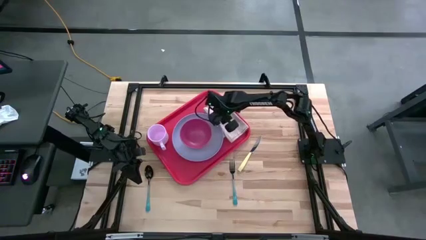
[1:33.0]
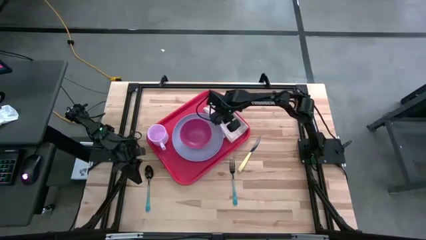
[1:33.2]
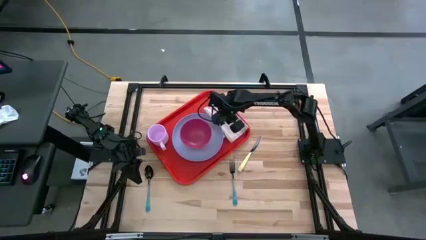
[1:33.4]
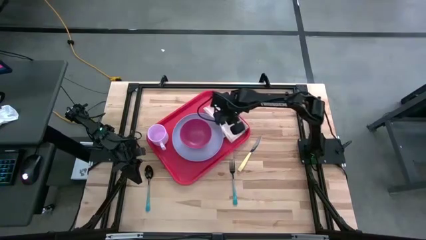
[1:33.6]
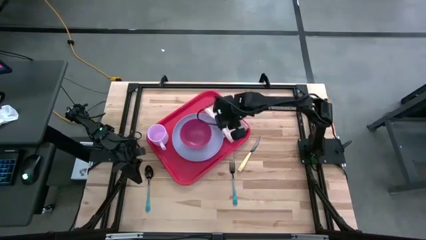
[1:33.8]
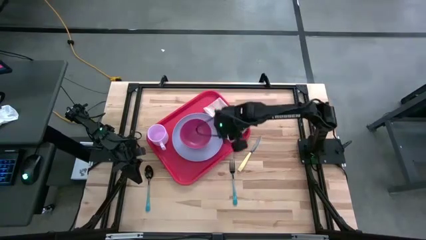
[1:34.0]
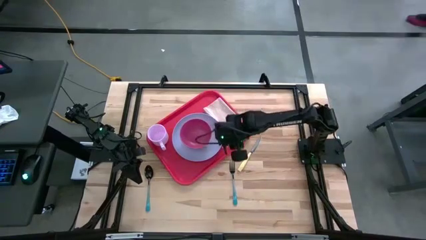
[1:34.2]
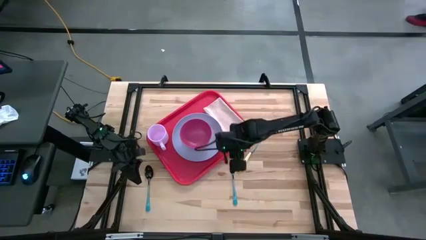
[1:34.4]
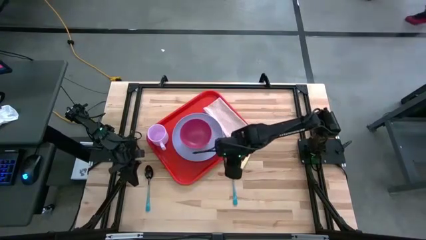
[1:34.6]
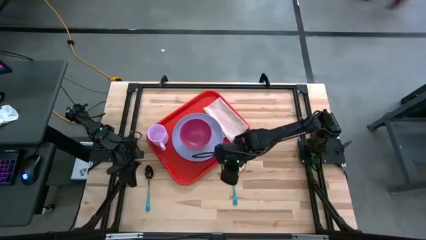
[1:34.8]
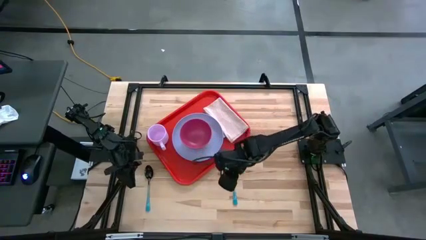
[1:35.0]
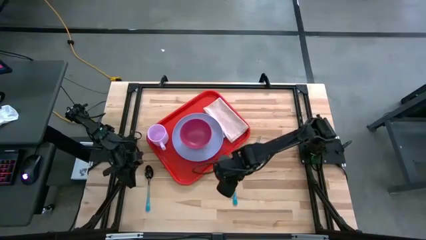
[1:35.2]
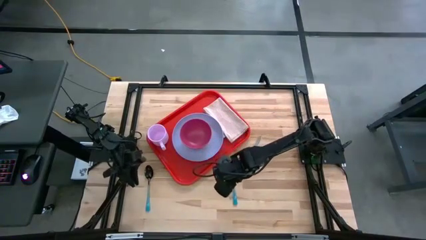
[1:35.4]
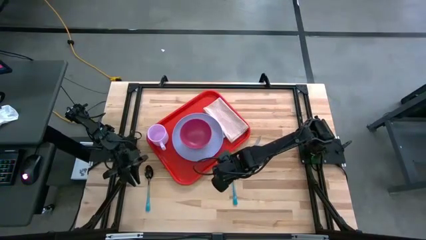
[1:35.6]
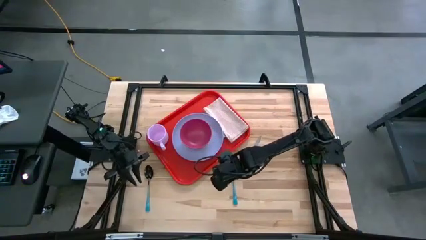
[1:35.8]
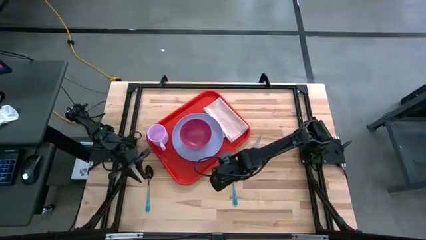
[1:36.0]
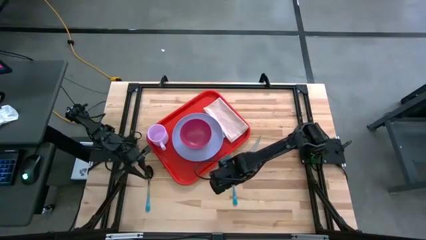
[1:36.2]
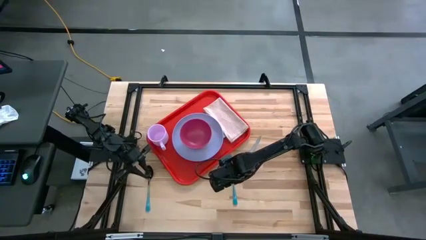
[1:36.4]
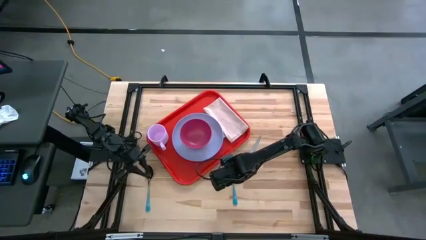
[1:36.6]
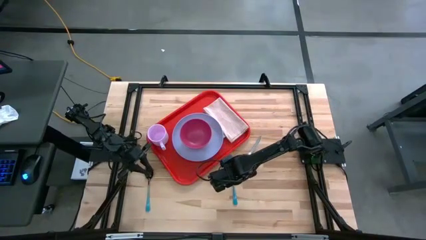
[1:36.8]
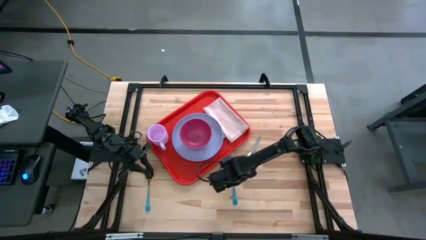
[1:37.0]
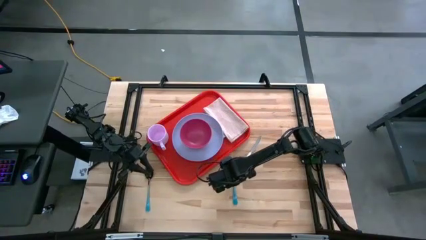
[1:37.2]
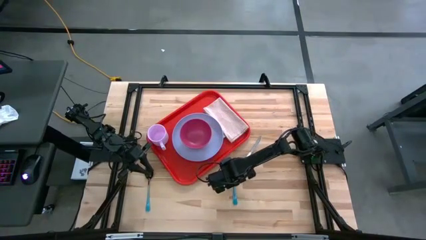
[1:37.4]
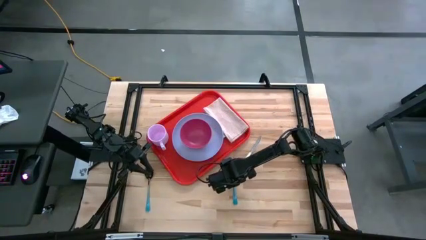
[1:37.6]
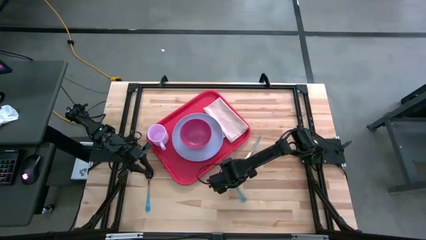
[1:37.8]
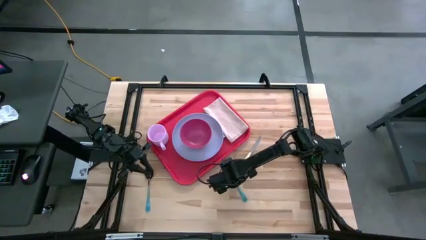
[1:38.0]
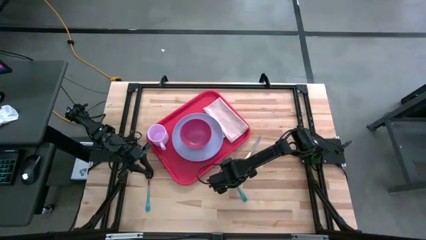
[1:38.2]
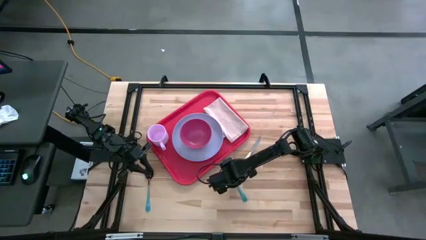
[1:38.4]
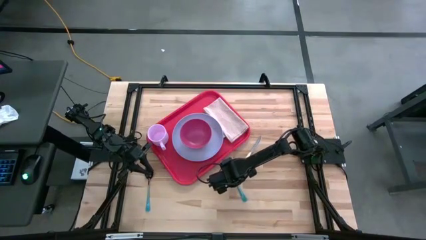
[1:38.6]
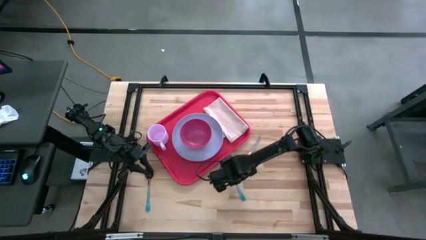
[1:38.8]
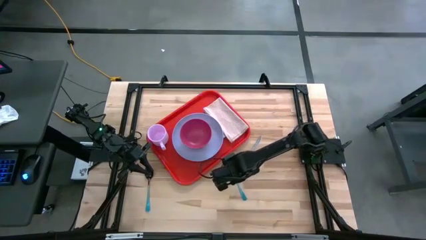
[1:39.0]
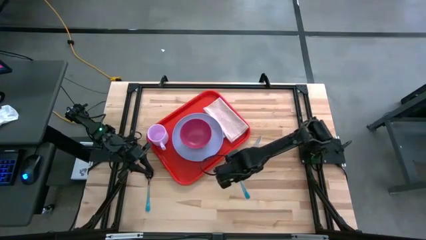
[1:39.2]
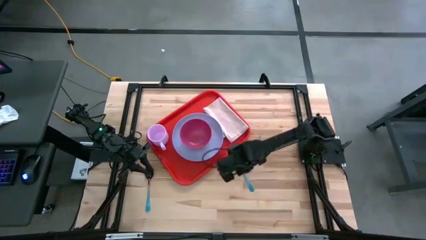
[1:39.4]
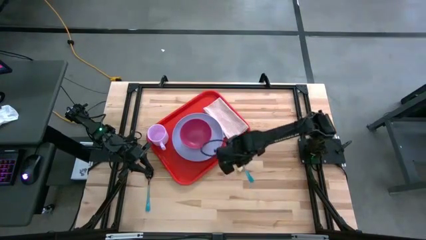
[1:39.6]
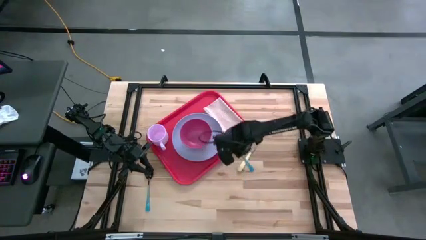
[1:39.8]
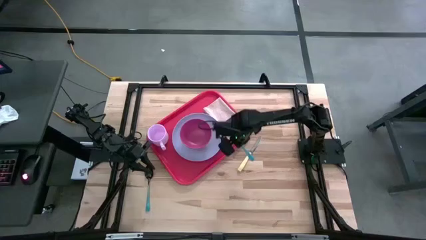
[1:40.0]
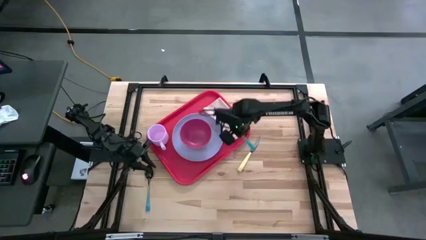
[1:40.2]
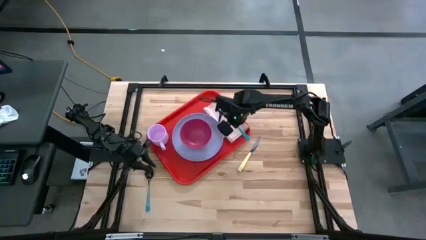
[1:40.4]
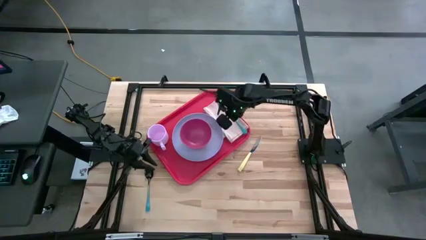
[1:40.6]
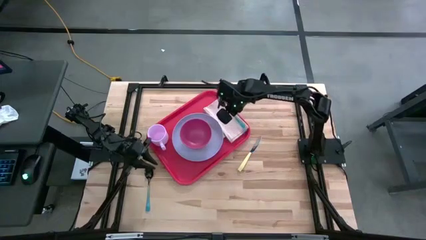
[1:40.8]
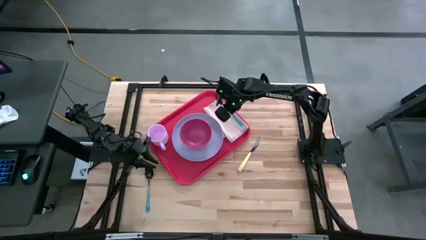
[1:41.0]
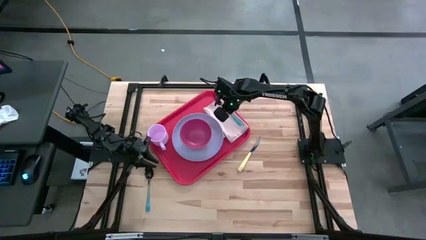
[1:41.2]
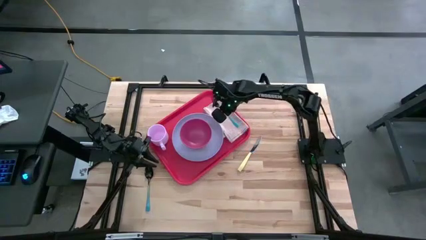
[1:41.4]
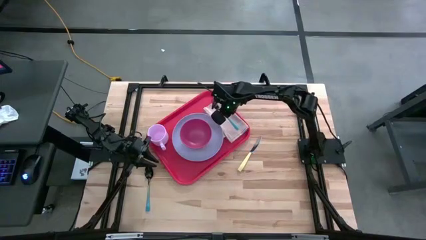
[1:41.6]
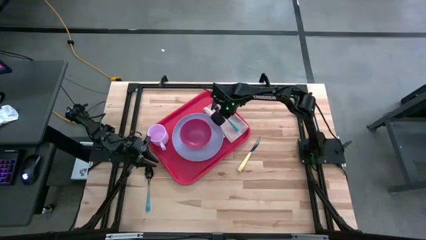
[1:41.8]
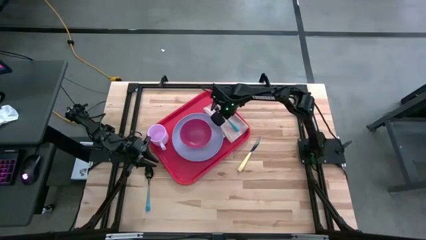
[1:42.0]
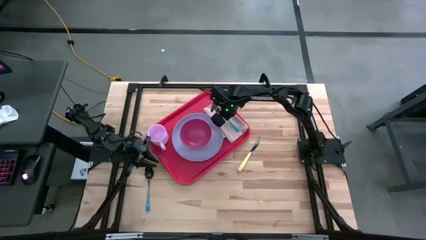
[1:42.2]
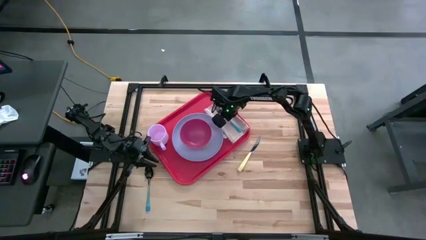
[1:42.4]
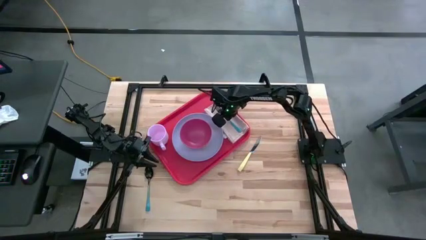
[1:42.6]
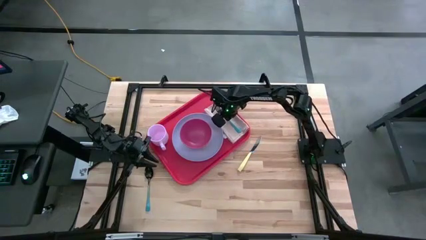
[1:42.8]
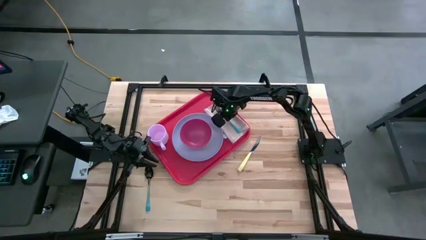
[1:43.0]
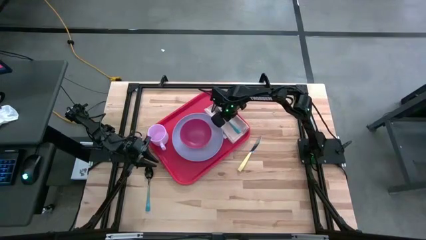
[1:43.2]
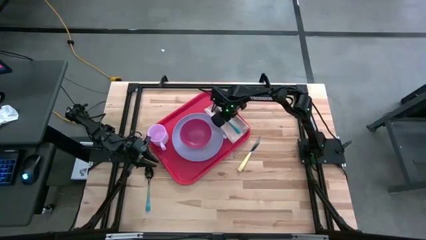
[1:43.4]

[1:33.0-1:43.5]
Task: Set up tray
Put the blue fork on top of the table napkin on the red serving tray

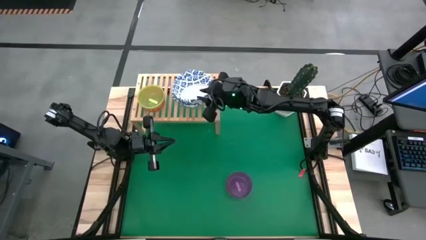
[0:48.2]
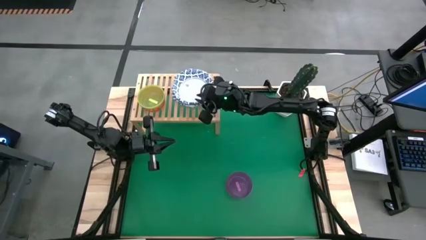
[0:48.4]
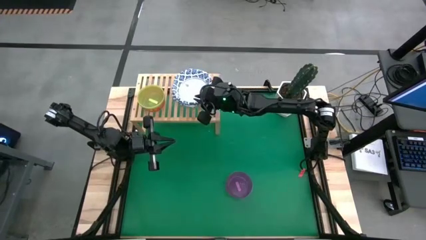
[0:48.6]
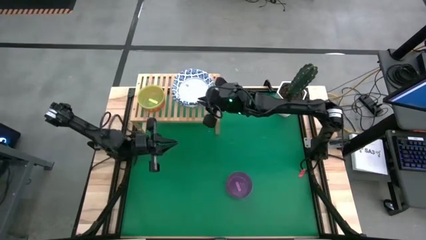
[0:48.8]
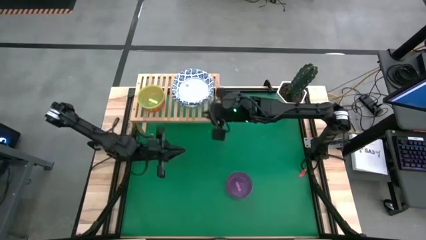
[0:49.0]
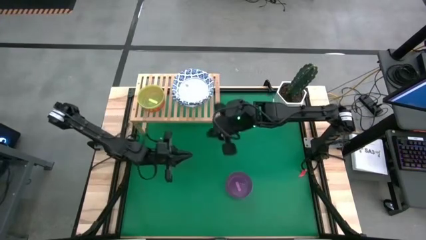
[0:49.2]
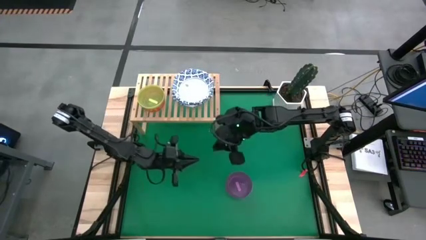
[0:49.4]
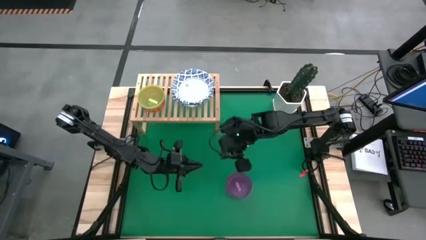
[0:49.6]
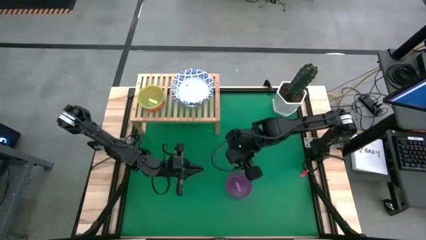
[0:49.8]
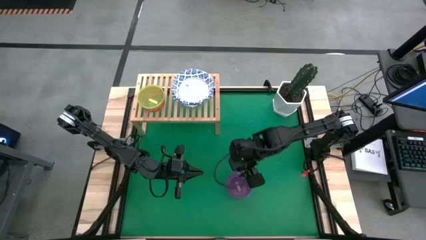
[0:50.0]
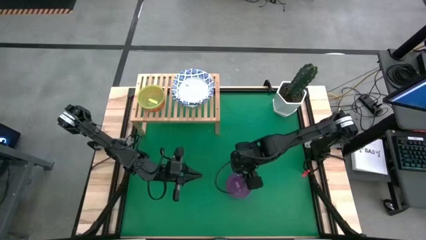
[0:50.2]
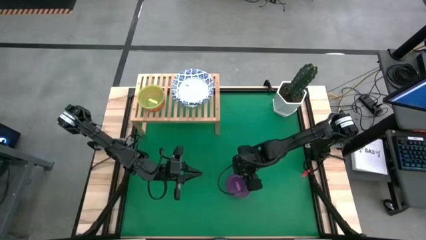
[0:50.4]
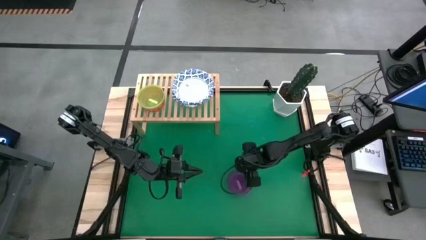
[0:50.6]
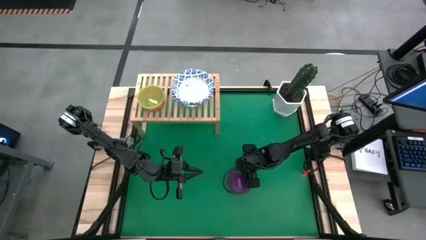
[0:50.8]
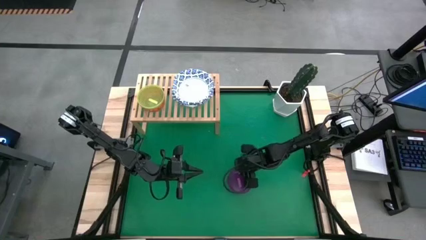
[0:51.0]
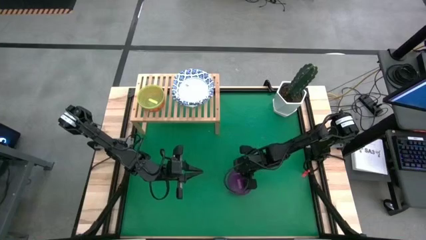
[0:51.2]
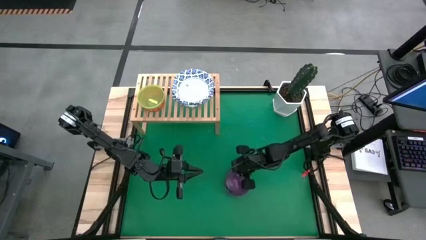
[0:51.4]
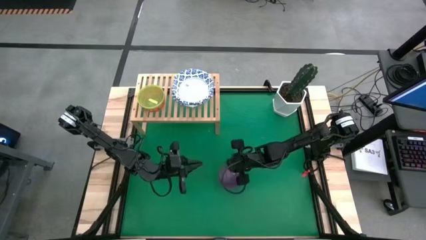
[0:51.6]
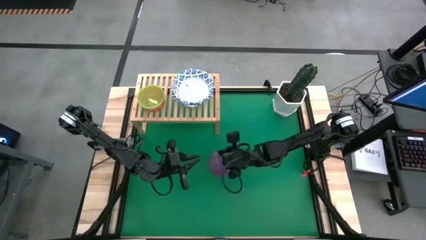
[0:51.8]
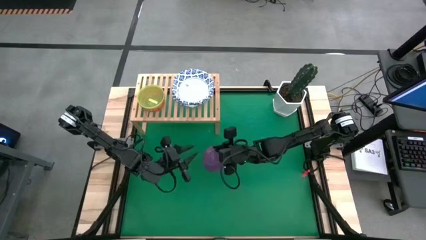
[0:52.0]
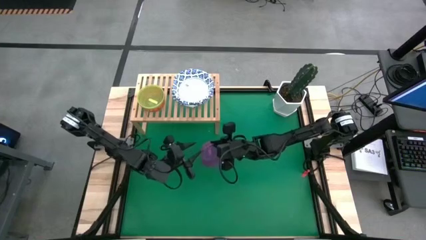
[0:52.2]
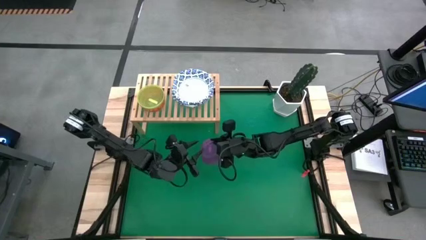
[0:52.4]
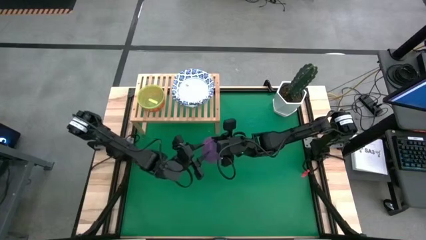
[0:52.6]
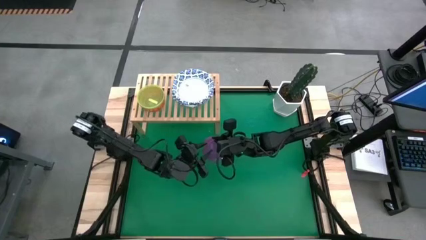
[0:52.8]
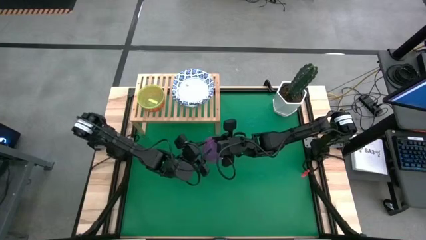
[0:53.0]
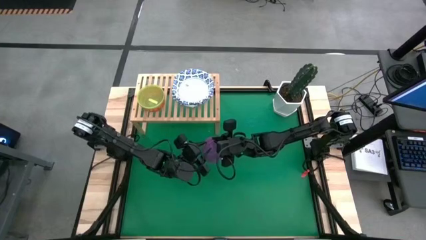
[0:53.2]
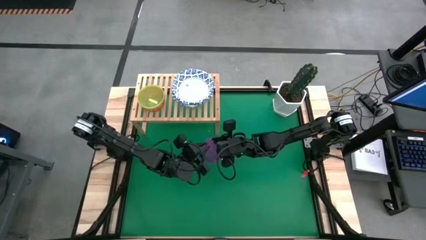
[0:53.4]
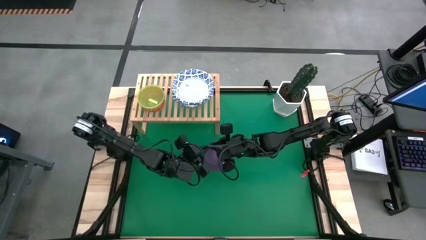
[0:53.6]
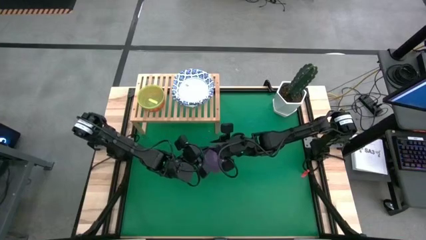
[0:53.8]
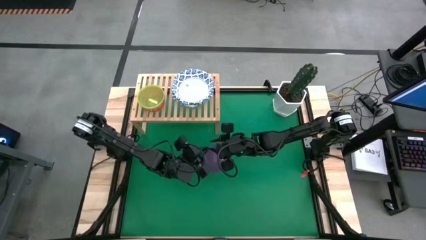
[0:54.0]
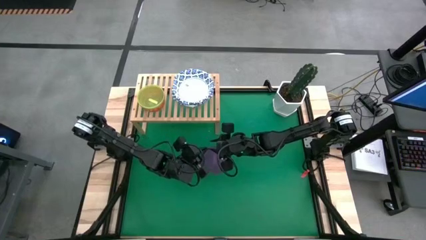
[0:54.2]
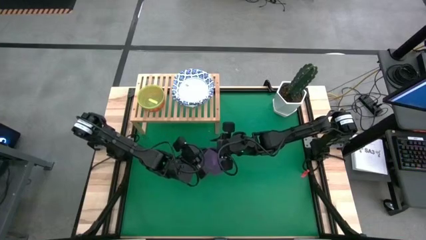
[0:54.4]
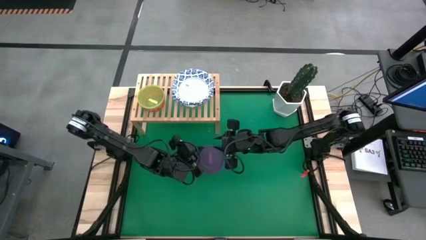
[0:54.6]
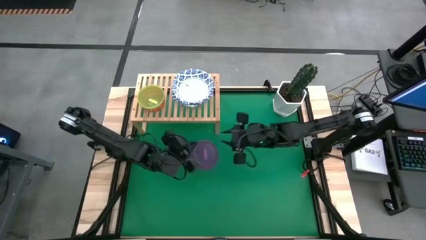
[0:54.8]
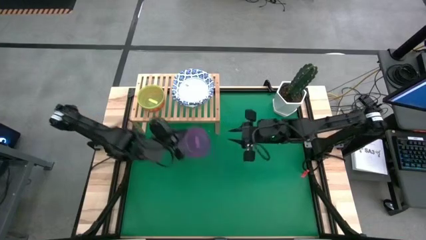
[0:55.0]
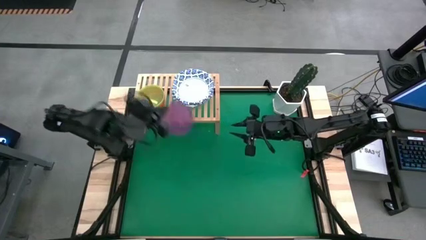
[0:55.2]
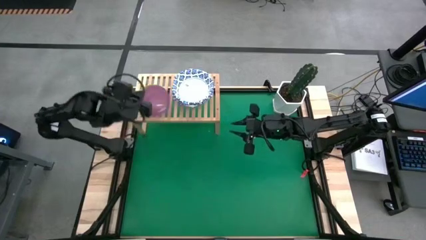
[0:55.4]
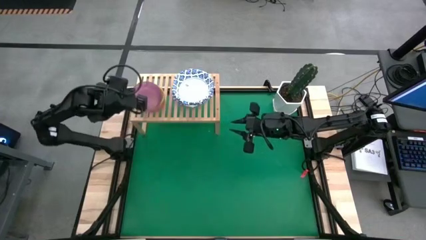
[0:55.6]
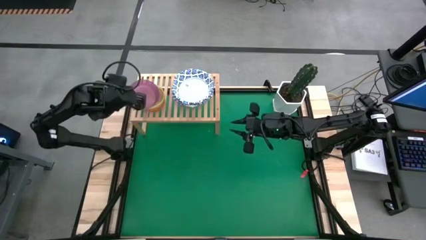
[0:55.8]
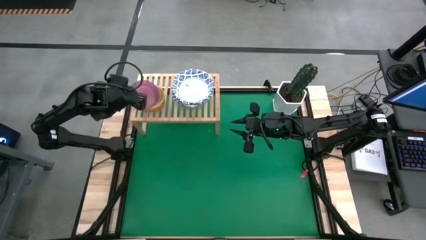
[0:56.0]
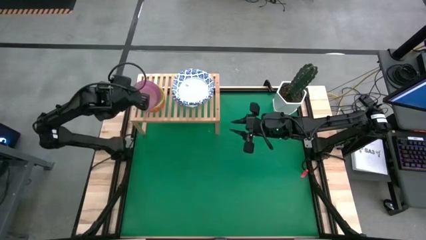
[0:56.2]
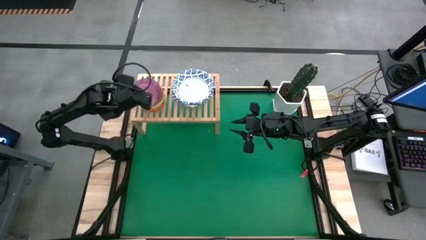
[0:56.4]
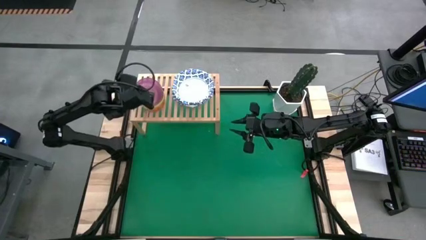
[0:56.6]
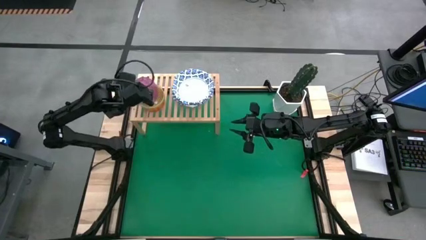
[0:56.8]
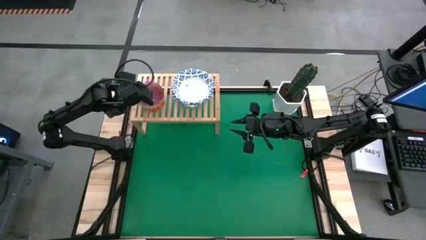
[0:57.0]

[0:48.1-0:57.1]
Task: Place and stack bowls onto a shelf
Stack the purple bowl on top of the yellow bowl on the shelf
